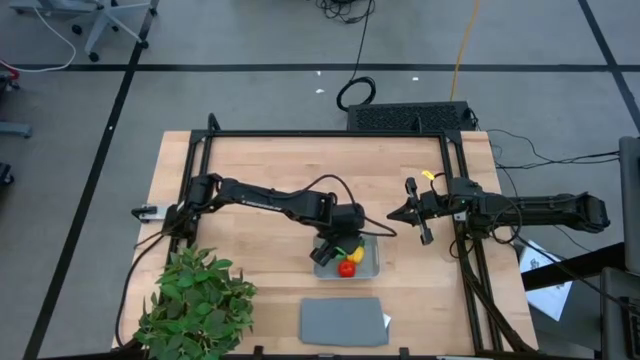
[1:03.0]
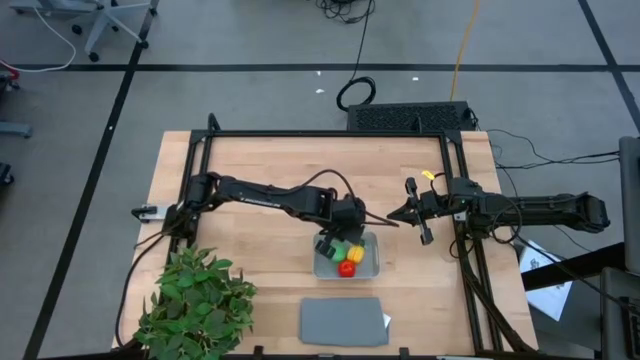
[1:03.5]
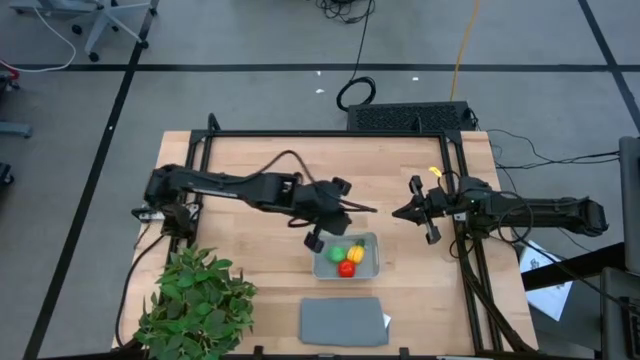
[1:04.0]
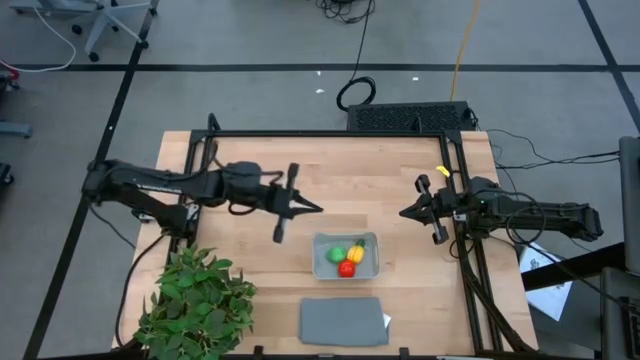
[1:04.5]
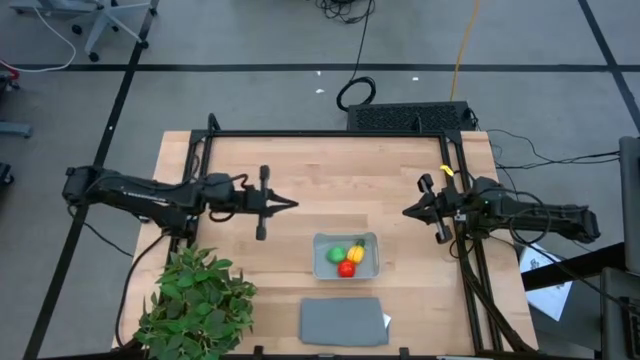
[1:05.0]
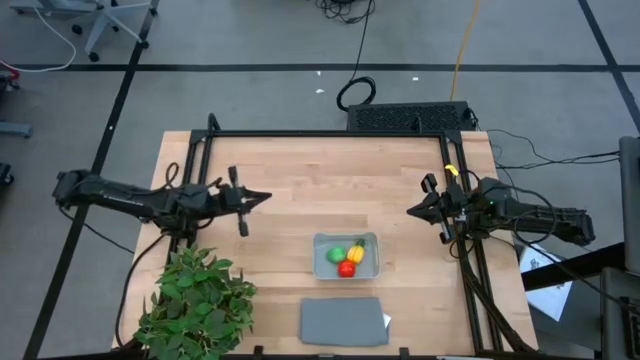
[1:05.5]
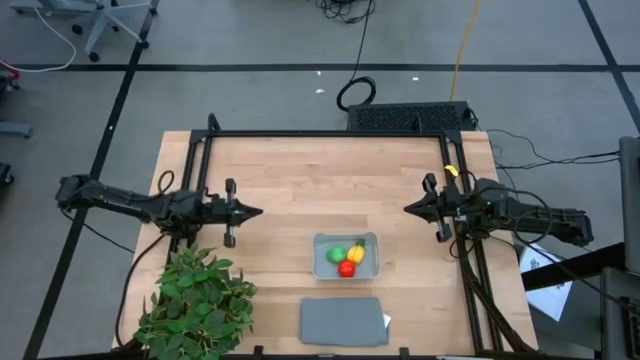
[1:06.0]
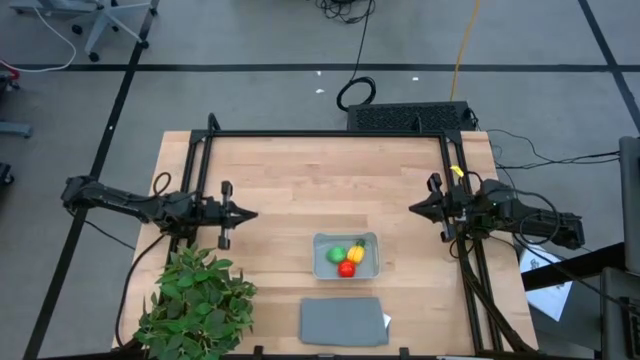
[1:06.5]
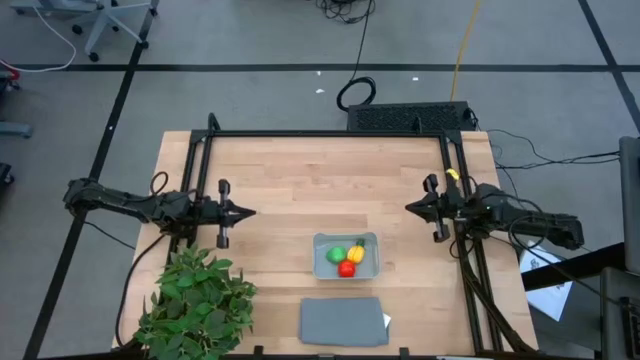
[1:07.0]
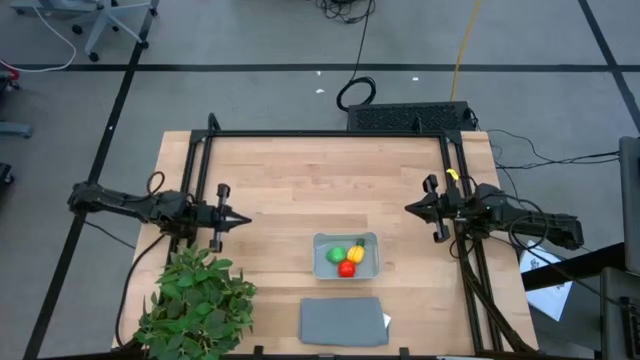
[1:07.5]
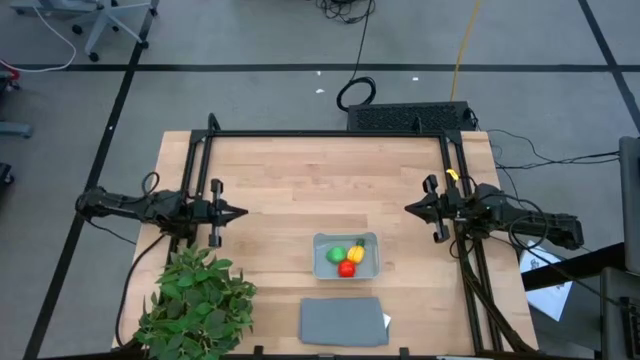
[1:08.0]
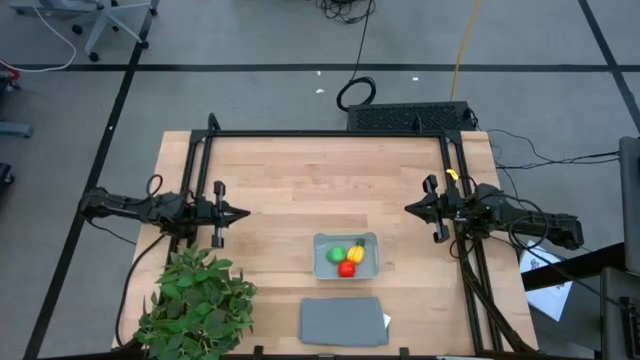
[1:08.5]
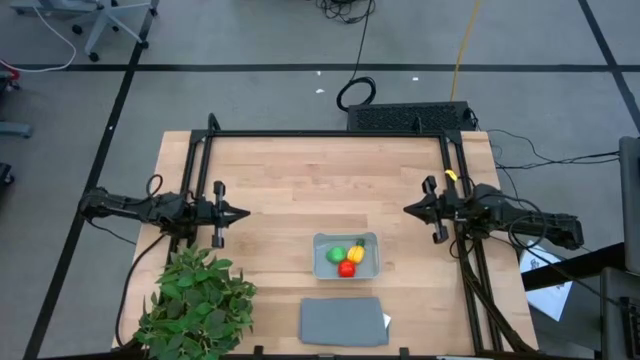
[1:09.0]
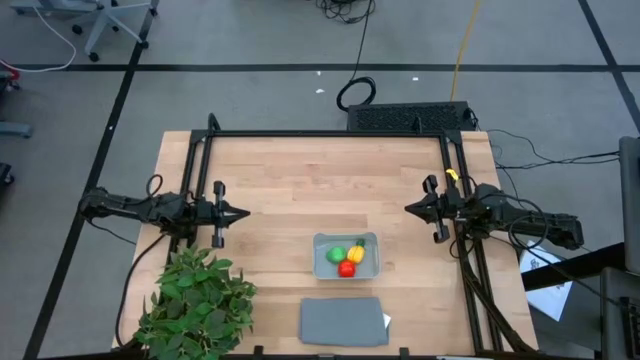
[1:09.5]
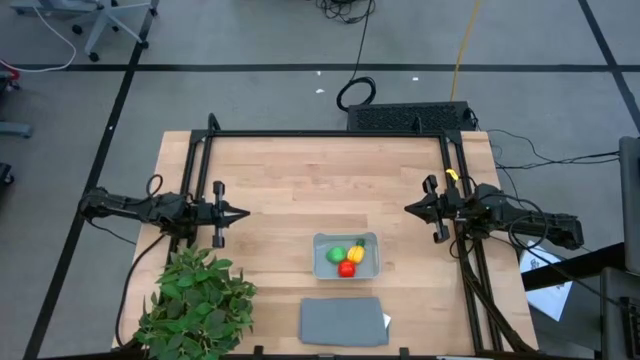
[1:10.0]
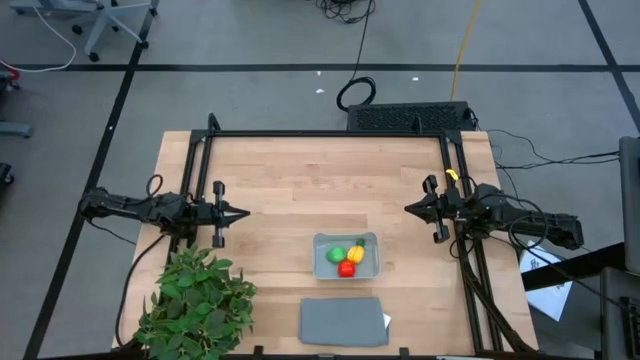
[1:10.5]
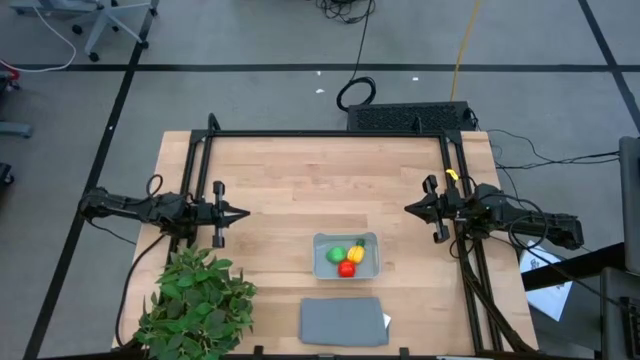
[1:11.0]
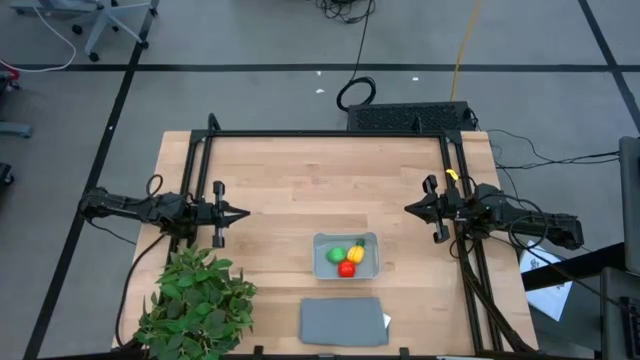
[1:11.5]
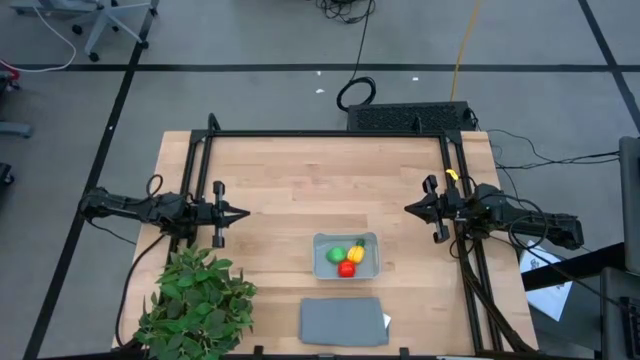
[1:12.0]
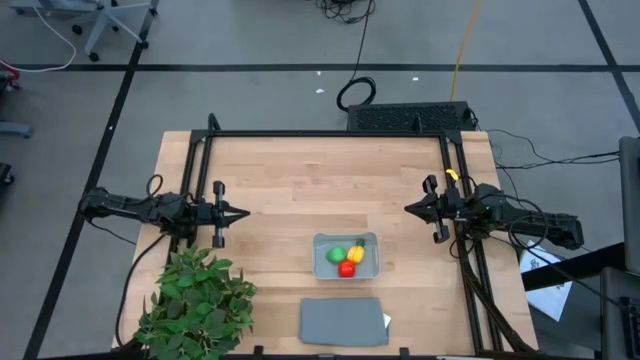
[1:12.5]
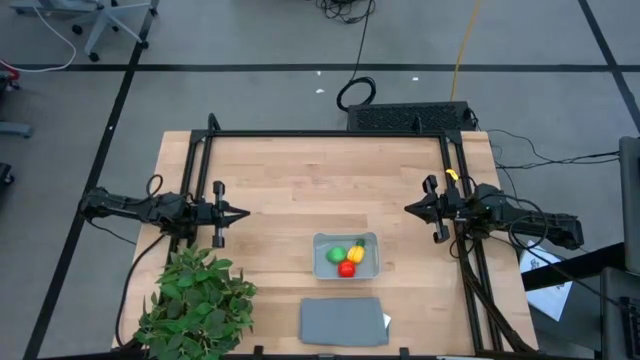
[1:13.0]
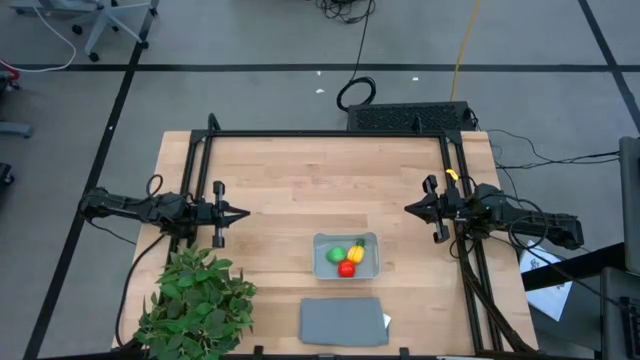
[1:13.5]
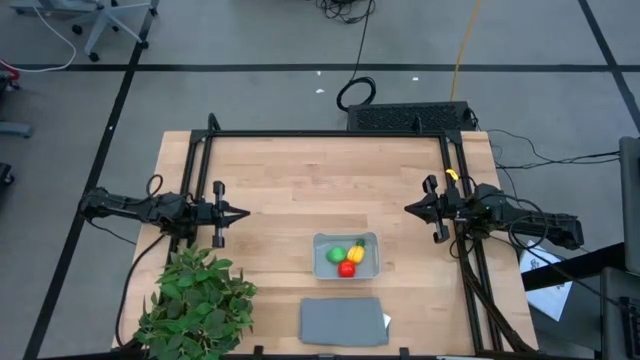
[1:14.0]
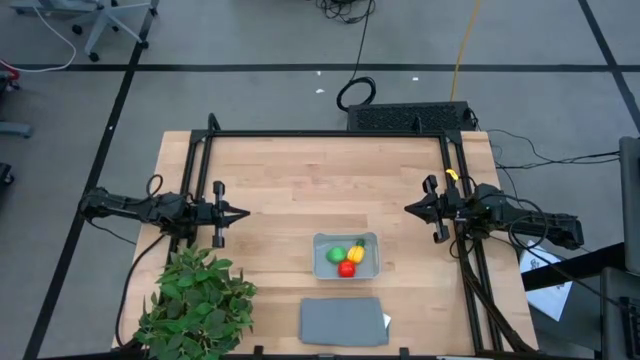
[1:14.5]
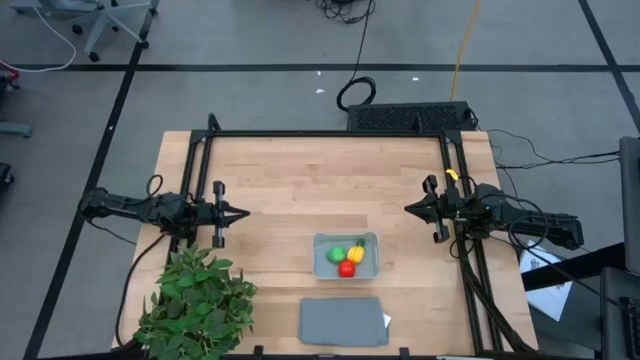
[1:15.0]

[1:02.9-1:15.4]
Task: Pick and placing Produce into tupperware
Return to Home Position

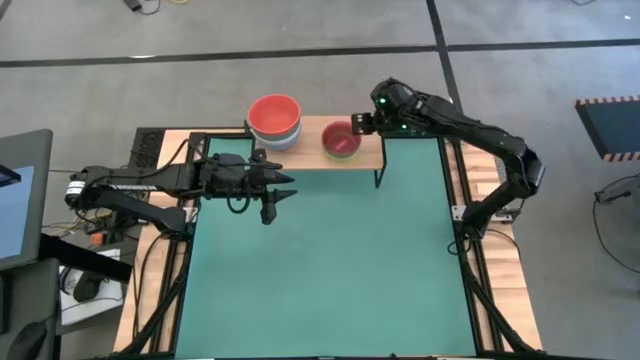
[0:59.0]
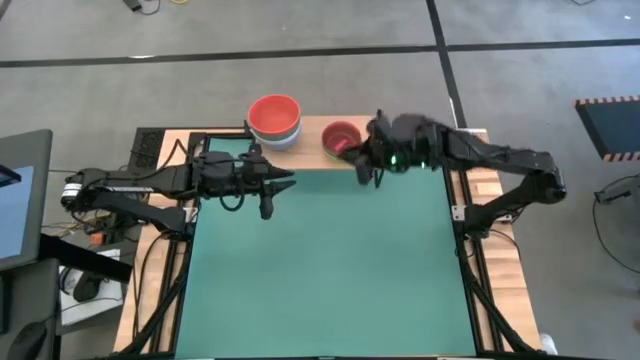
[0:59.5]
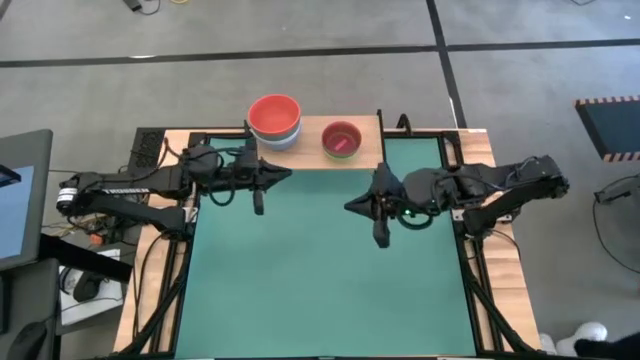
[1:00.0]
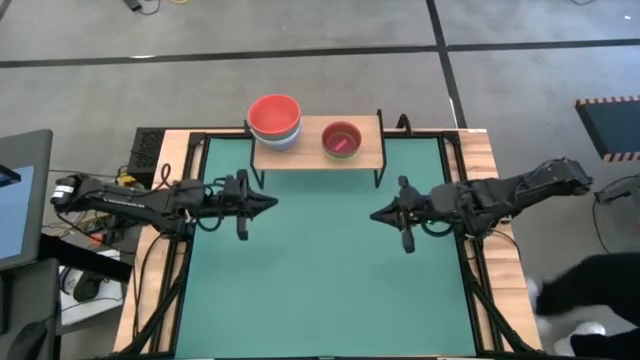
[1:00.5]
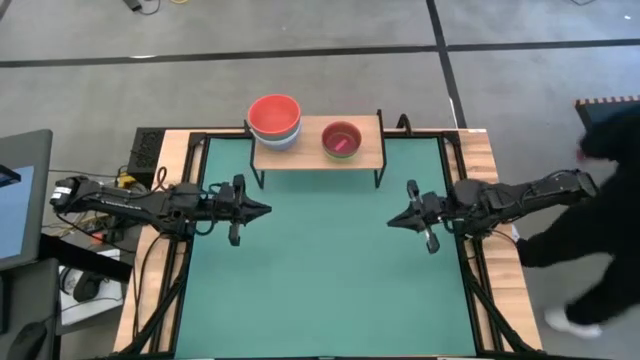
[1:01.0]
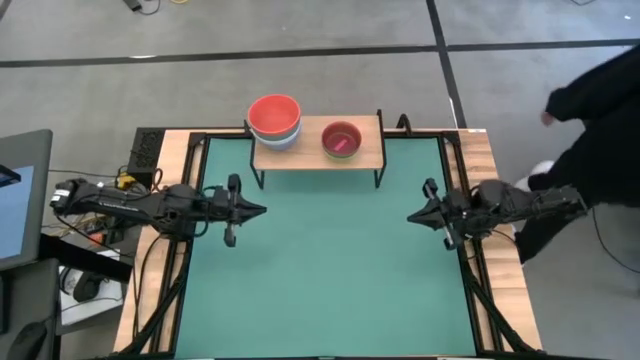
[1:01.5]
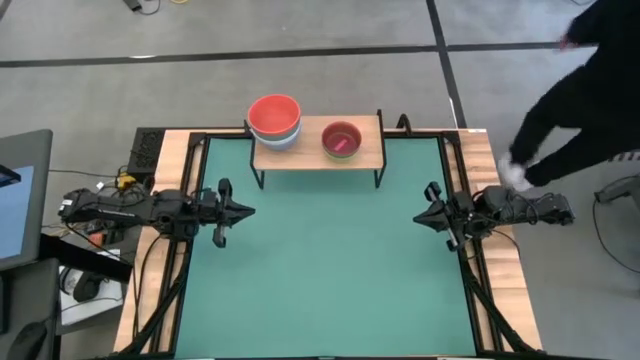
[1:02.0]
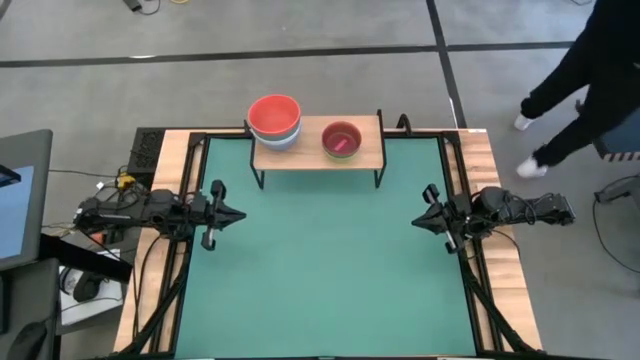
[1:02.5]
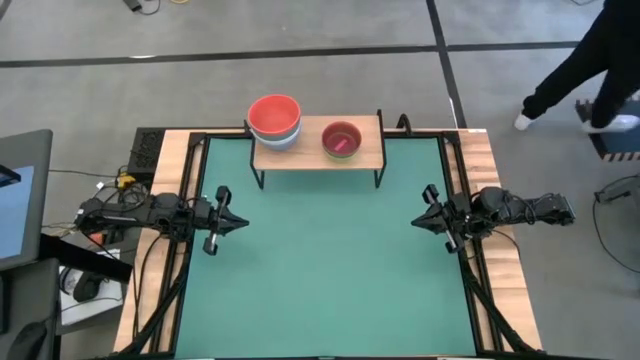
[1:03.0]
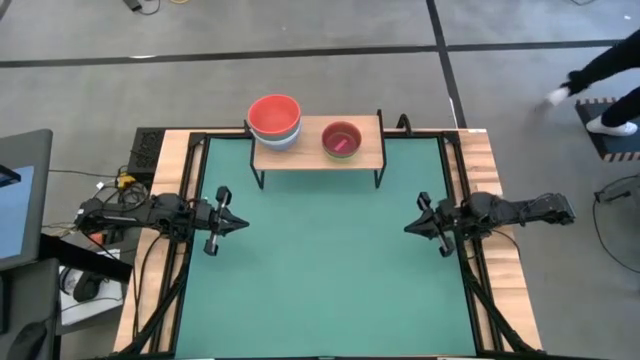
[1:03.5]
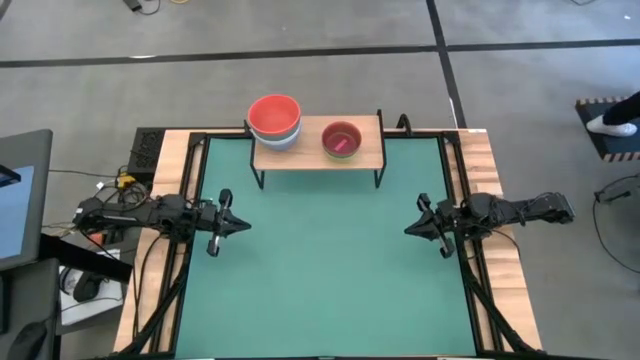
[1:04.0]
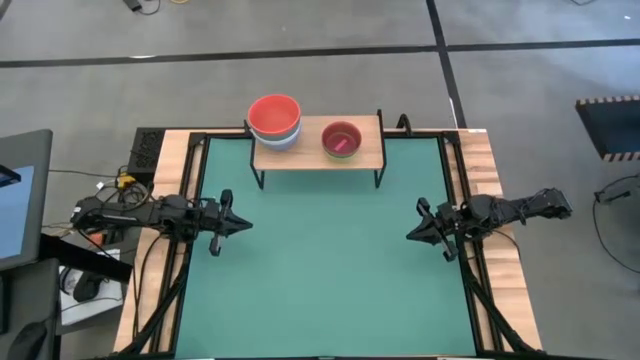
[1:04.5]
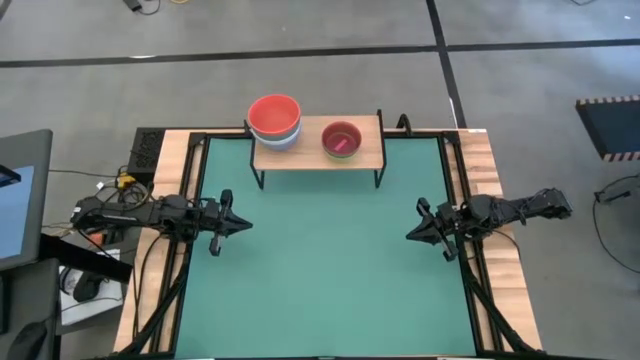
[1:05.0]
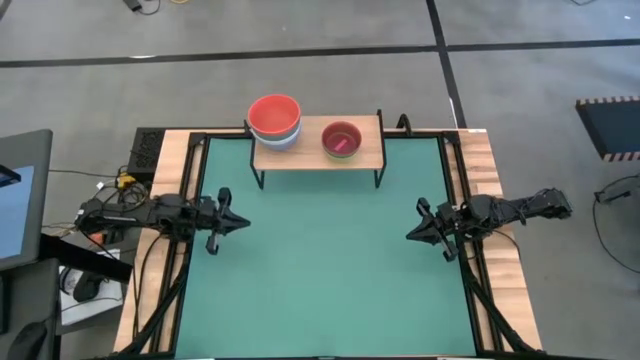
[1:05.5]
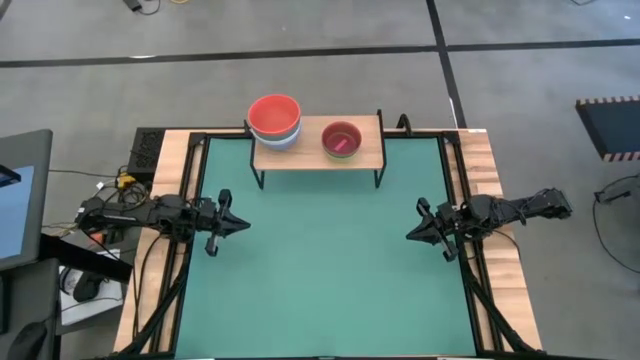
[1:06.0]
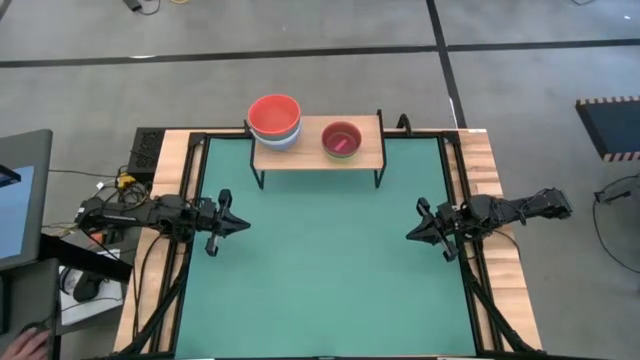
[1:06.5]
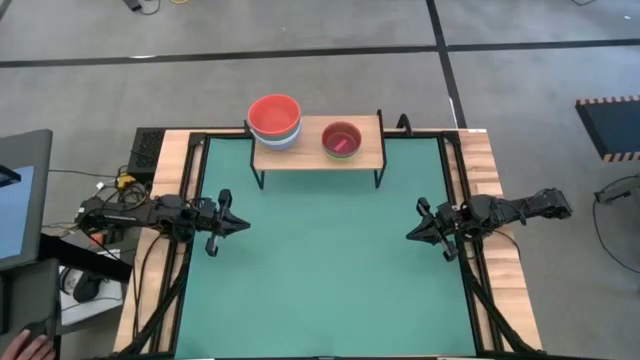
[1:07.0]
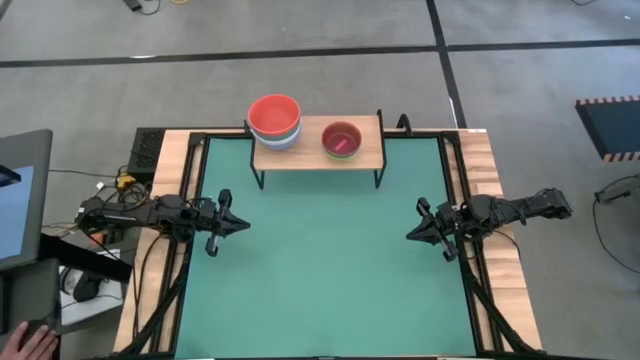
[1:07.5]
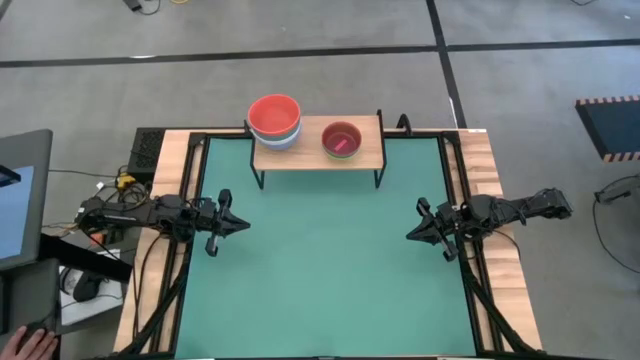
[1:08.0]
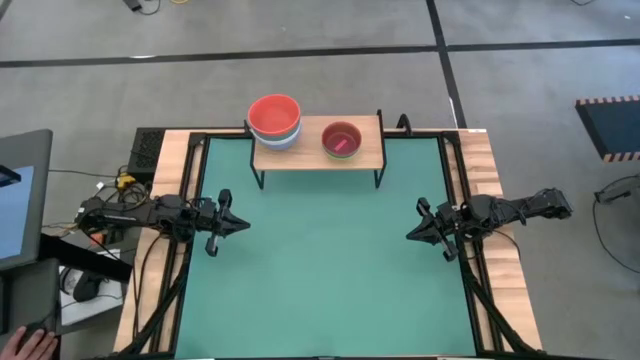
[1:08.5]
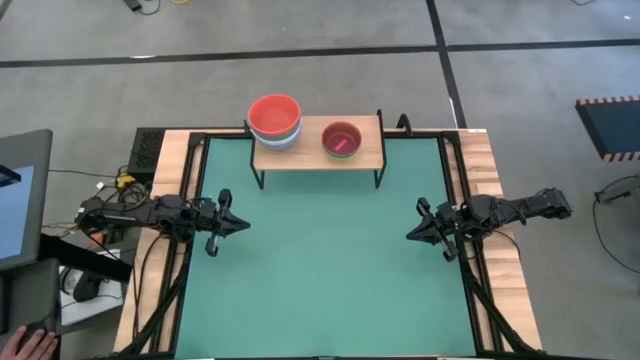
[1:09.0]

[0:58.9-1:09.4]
Task: Place and stack bowls onto a shelf
Return to Home Position
